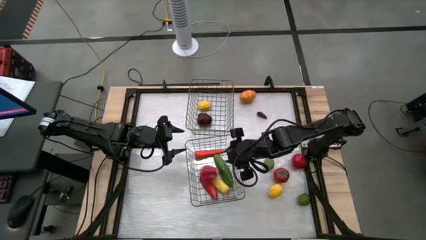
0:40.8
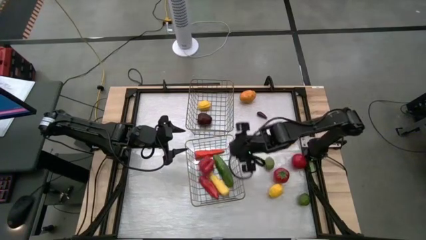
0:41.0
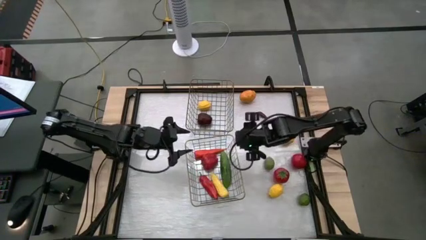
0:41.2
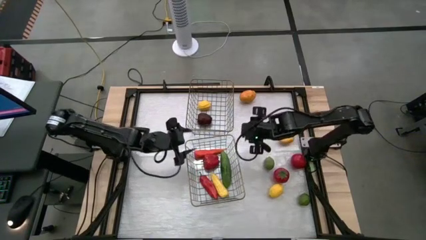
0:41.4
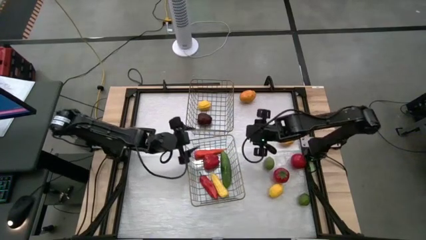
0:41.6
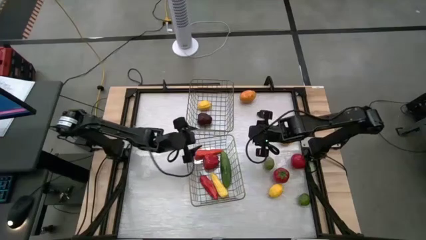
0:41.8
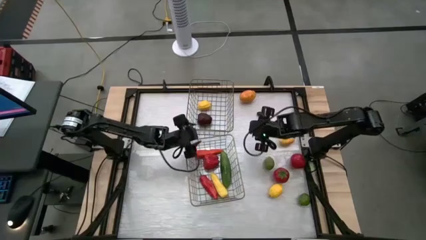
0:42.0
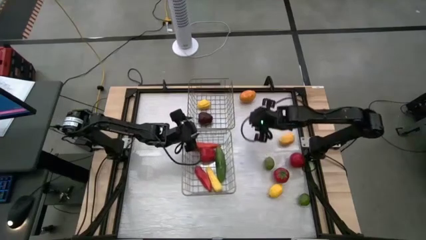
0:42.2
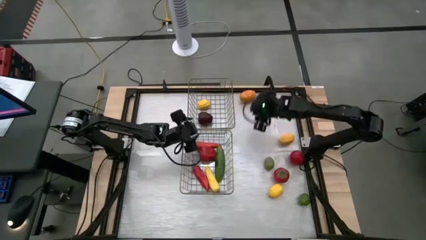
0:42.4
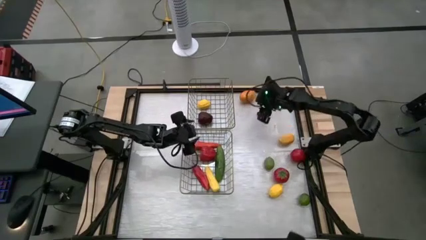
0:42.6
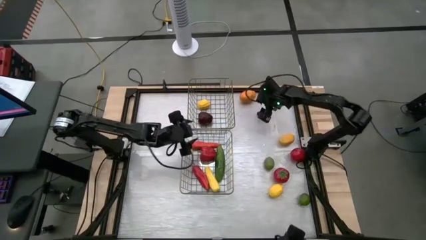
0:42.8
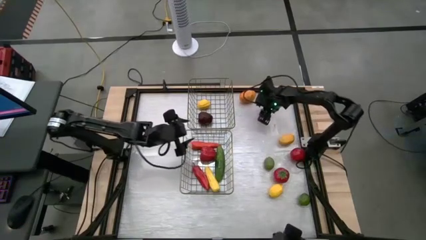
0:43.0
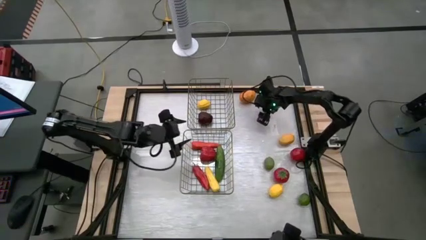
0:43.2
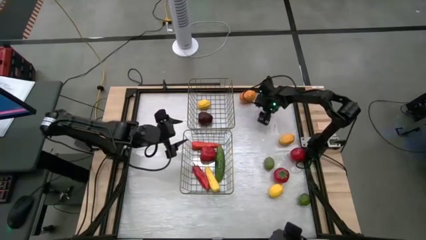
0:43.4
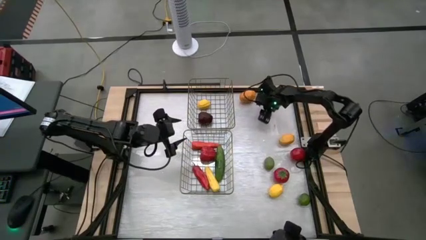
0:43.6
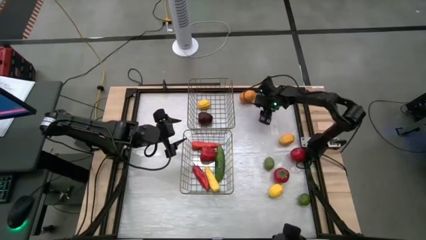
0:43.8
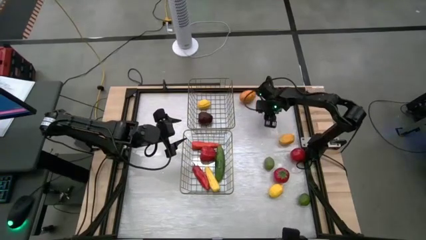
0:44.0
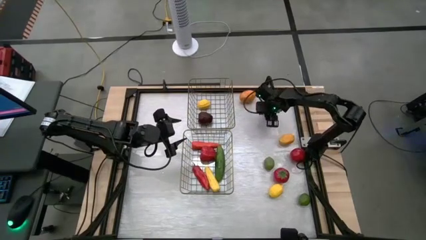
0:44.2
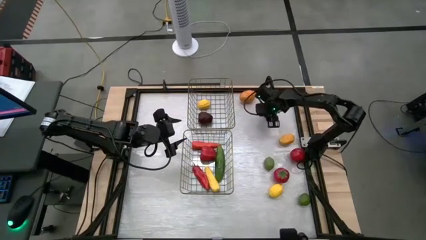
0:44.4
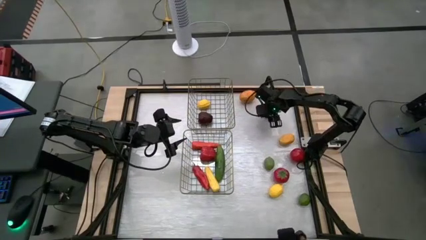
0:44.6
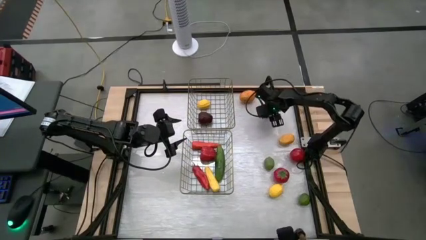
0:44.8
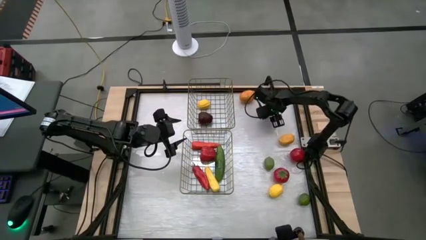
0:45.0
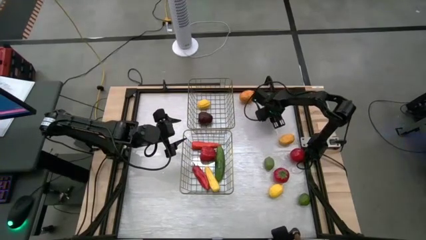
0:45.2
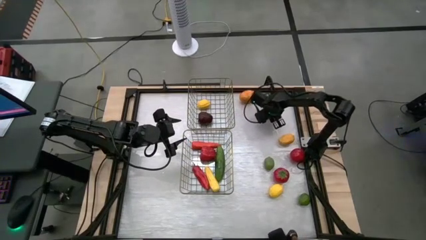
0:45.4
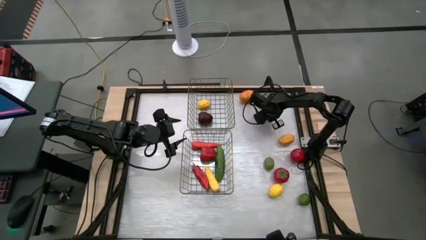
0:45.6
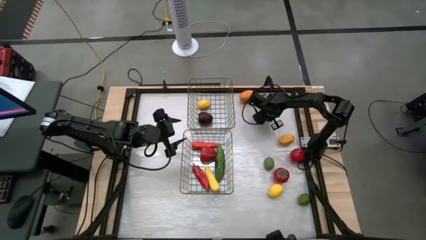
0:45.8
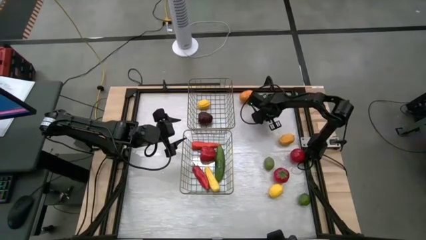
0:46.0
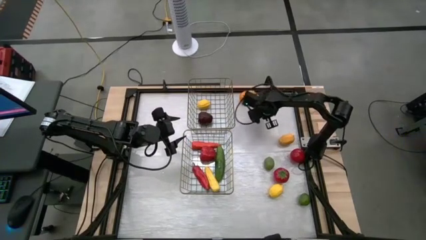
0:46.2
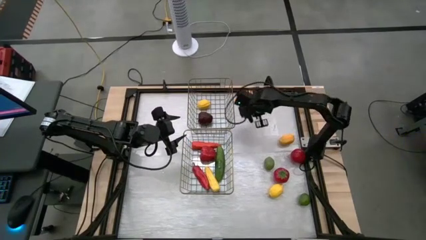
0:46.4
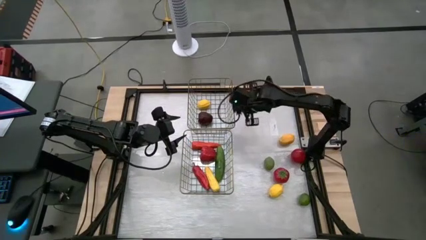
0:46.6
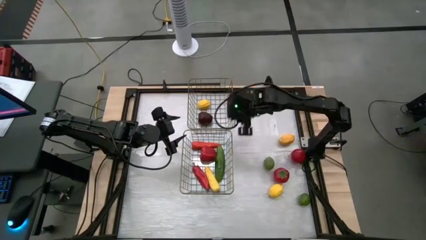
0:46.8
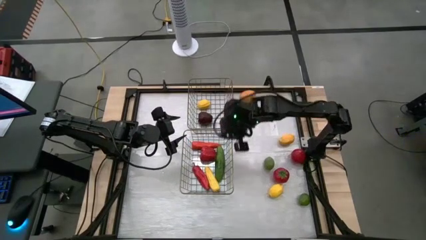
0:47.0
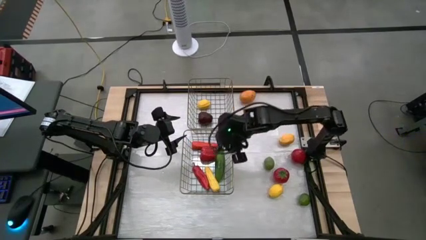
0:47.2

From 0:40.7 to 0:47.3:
Task: Sort produce into baskets
Put the purple eggplant into the bottom wire basket

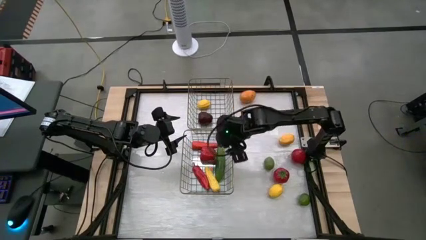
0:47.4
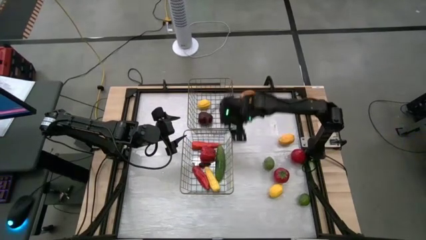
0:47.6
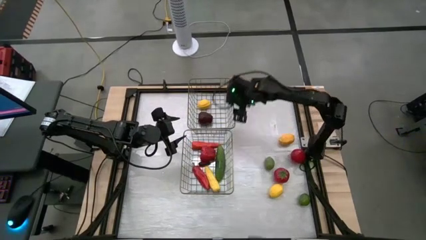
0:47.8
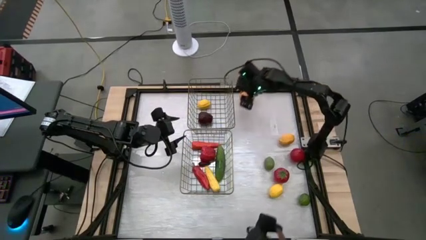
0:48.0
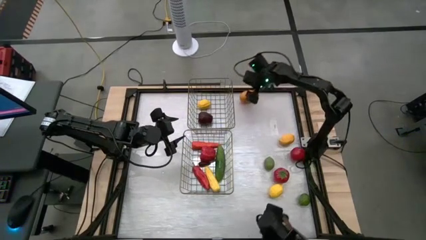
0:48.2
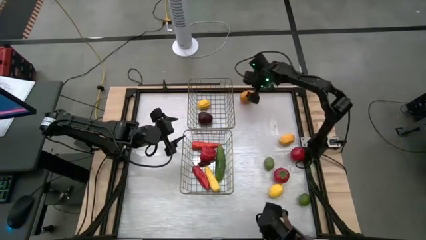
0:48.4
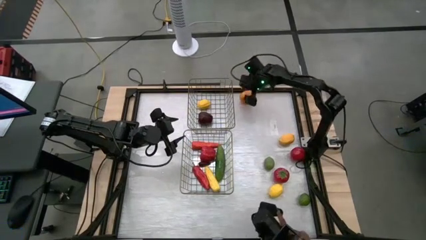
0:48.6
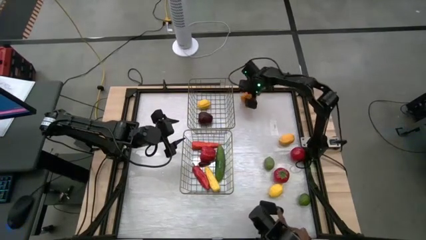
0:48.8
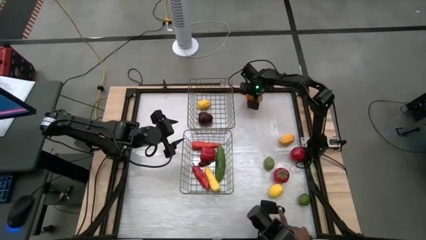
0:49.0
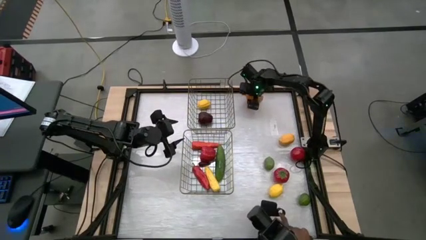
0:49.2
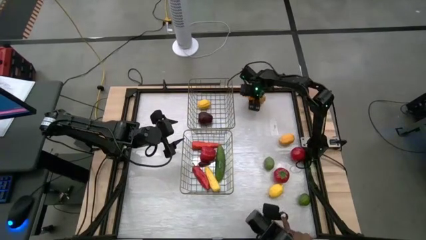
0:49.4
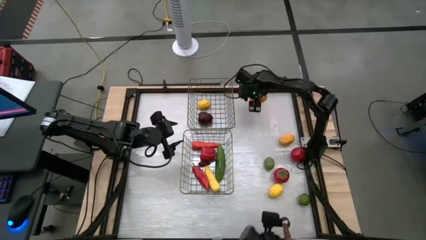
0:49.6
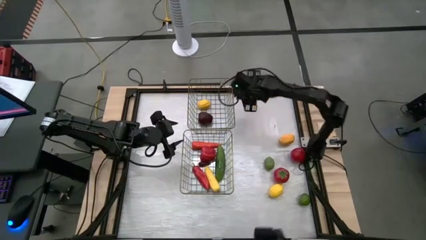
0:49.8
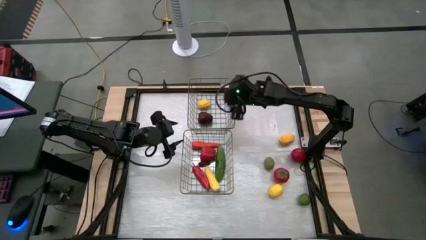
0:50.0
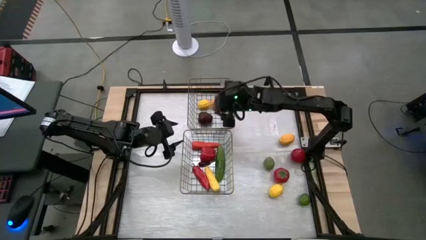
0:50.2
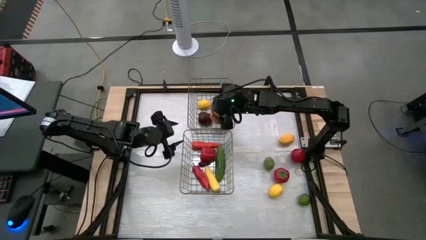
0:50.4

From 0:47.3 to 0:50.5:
Put the orange potato into the bottom wire basket

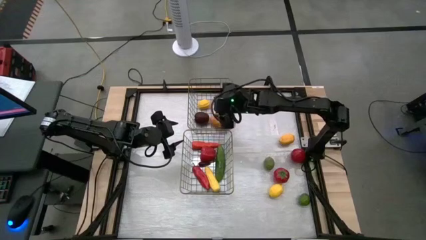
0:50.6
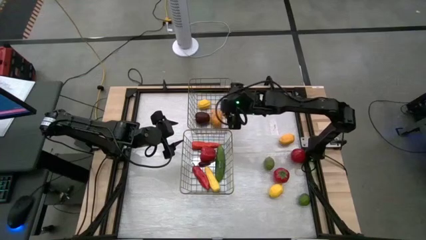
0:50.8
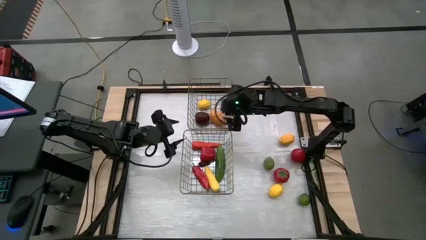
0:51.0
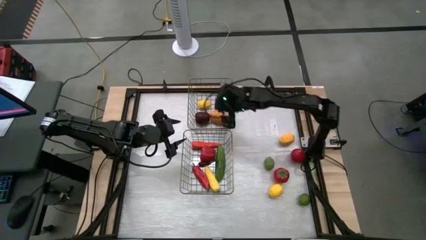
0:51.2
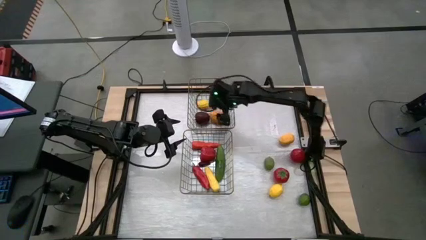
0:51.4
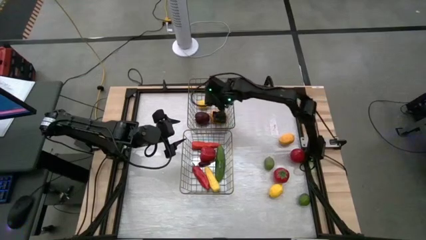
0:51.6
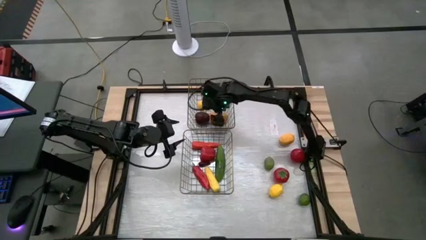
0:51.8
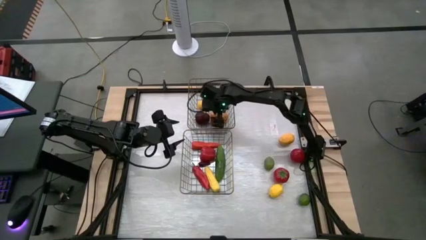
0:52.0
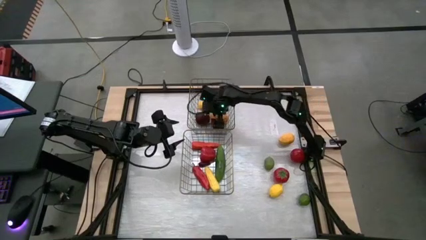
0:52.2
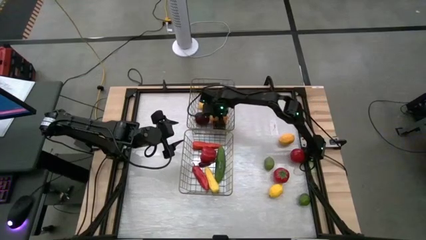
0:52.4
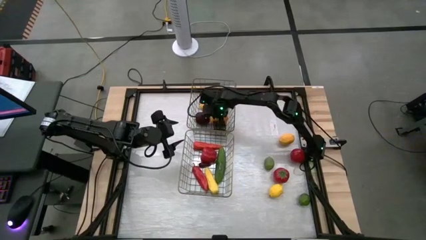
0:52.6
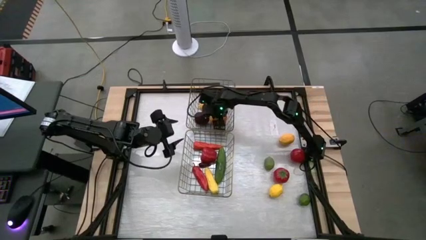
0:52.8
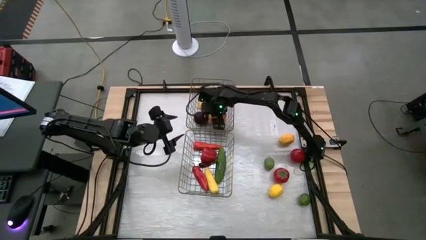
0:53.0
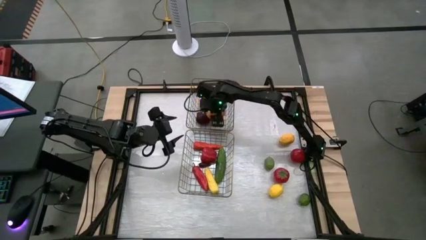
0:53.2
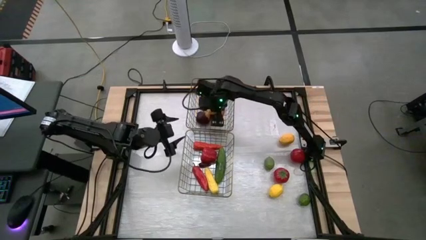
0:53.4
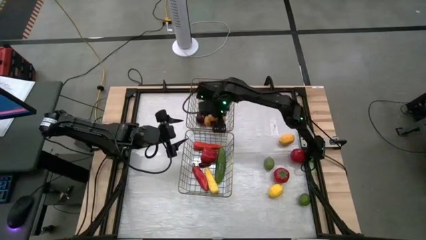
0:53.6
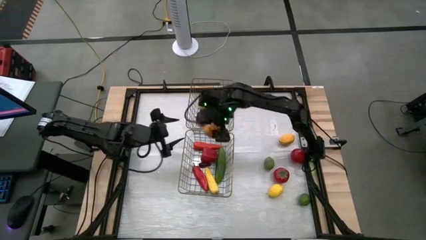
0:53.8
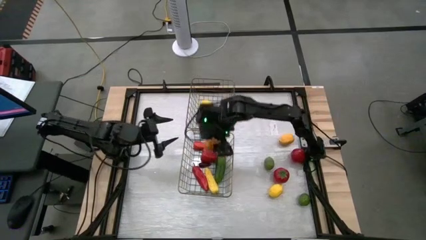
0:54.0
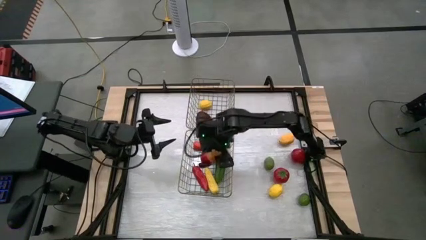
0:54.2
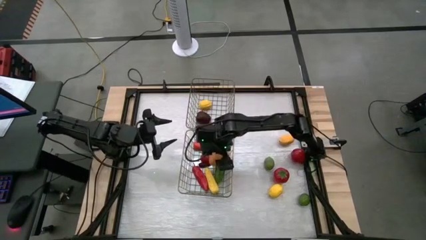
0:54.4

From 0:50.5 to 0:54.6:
Put the orange potato into the bottom wire basket

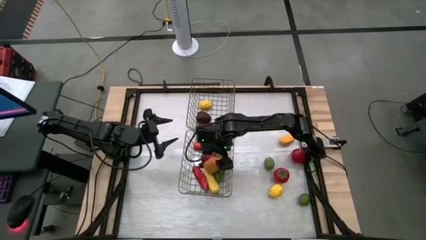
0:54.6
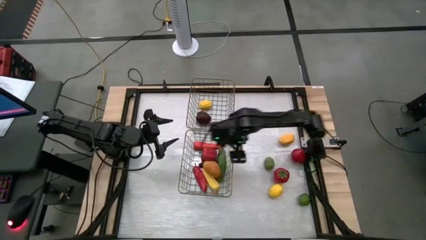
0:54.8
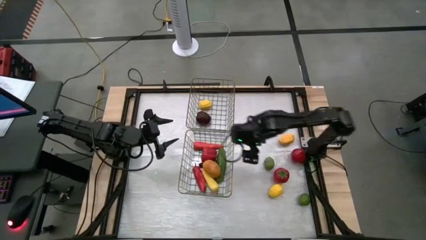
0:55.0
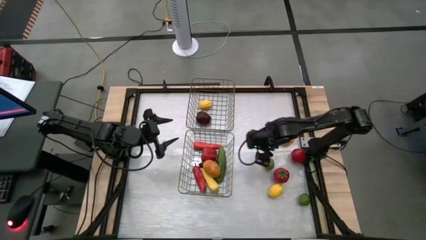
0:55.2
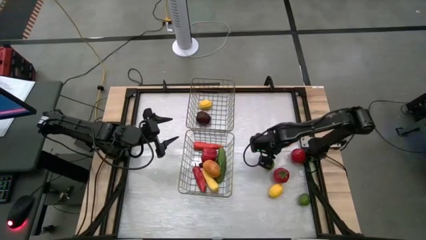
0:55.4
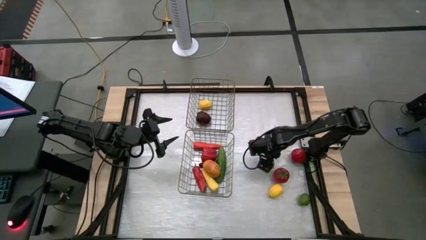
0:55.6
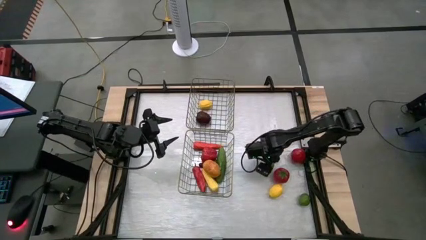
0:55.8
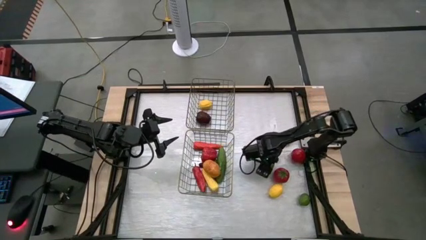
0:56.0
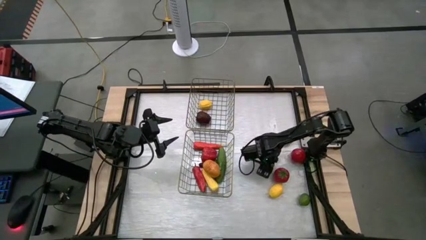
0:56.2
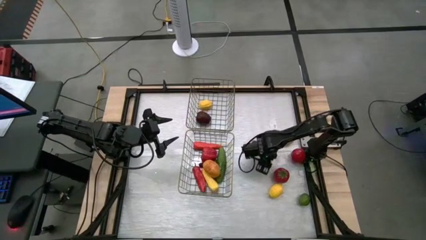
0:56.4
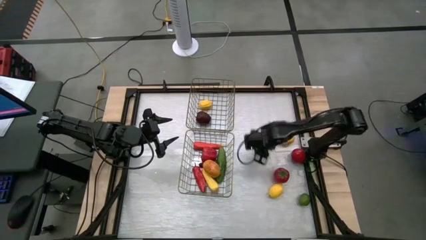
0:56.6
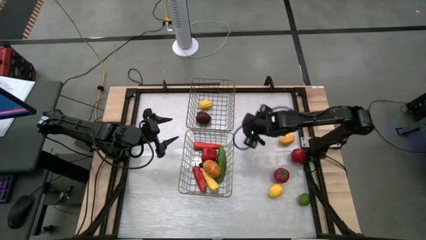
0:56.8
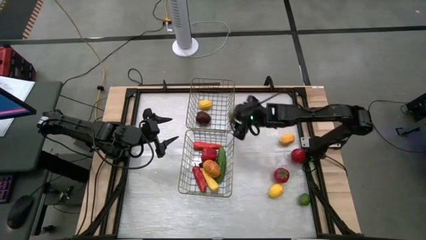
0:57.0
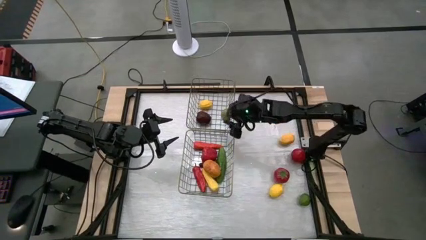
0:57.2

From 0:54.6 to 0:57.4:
Put the top green lime into the top wire basket
